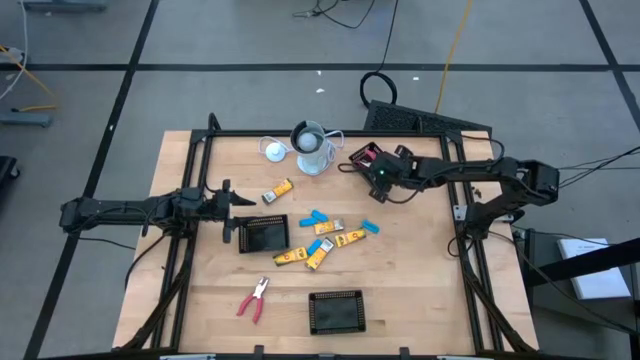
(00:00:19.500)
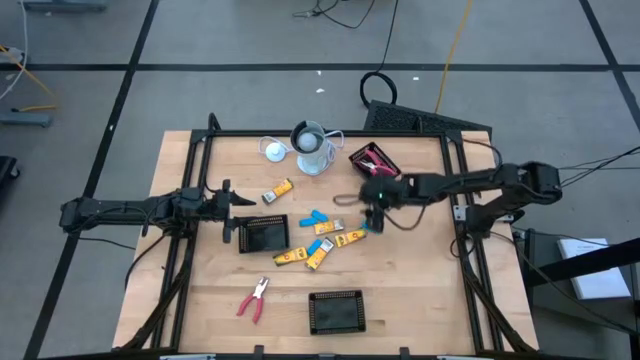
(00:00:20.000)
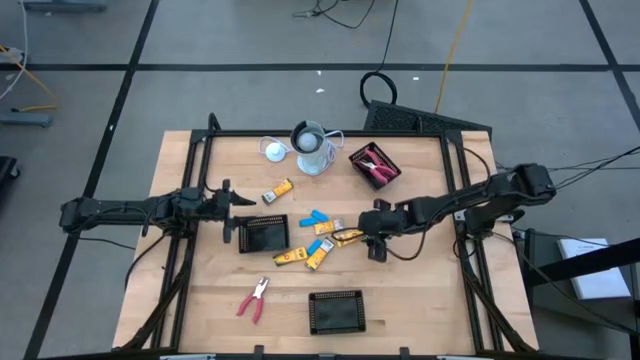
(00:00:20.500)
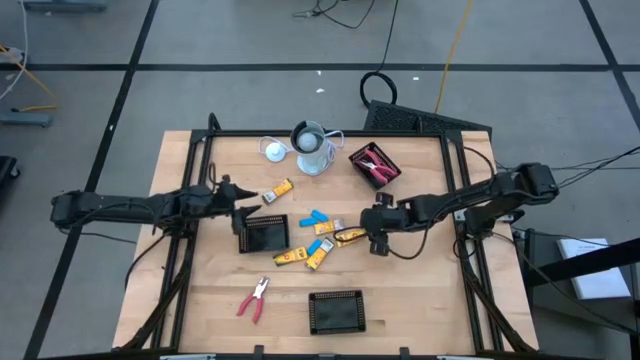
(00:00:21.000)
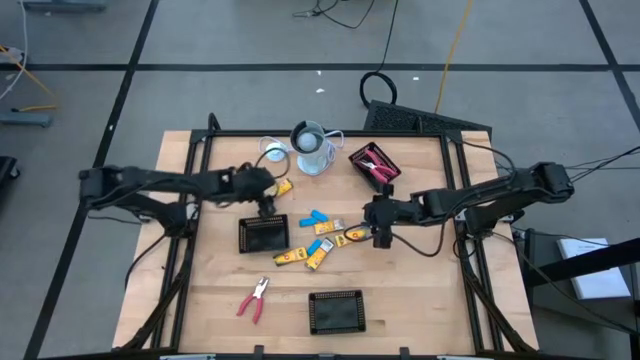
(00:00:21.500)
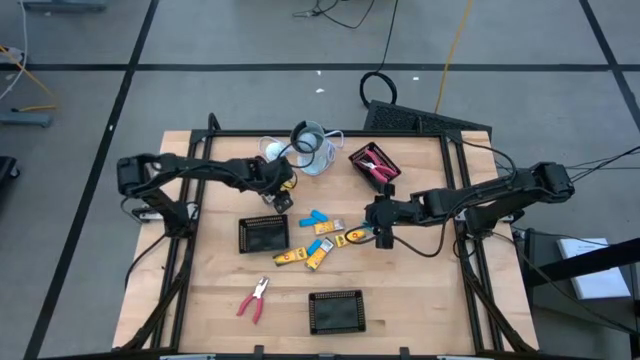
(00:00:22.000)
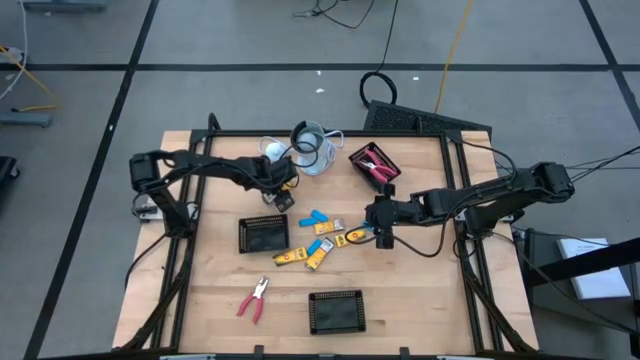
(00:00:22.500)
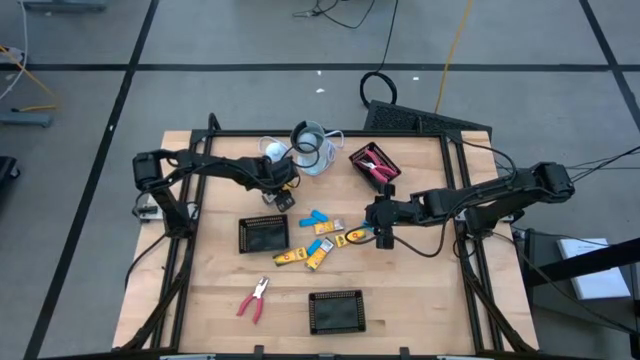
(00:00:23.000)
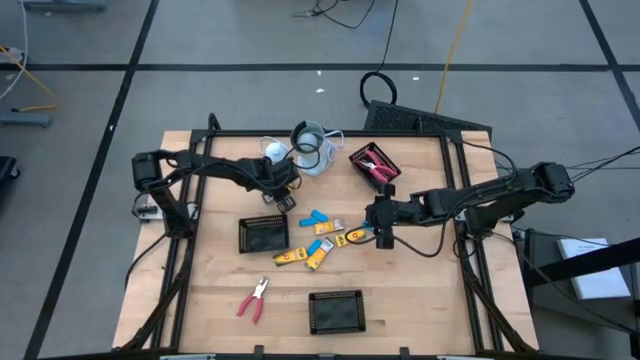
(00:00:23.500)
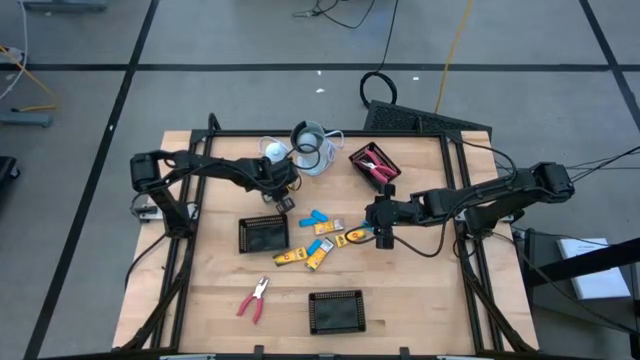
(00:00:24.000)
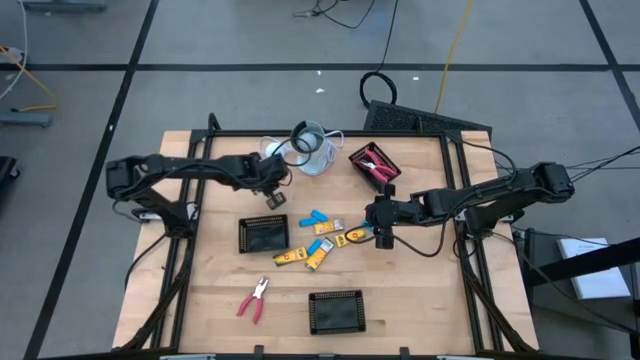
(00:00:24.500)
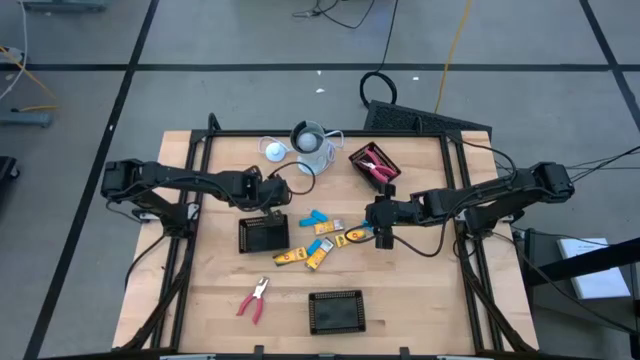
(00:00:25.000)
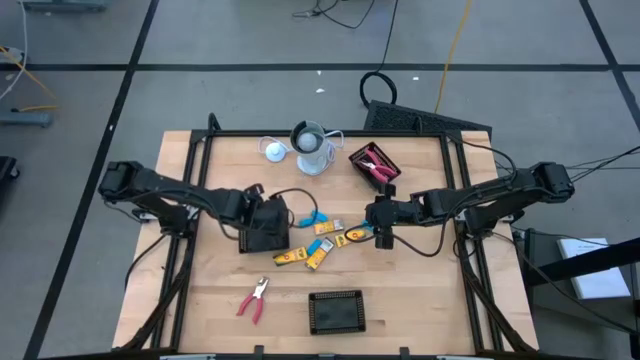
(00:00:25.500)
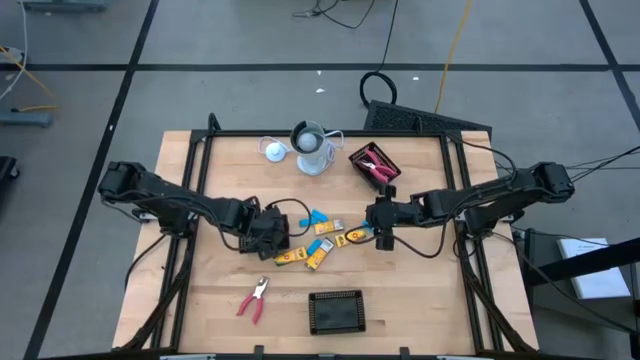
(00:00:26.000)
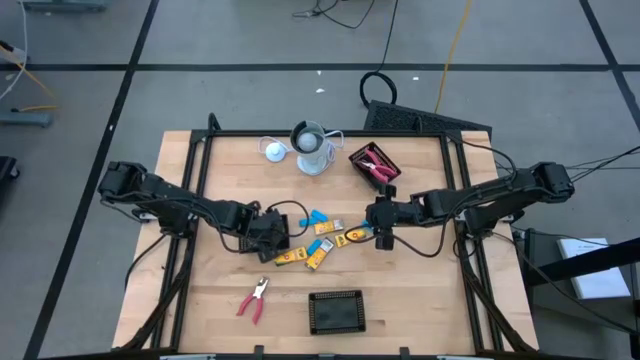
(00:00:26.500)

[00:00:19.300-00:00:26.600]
Task: Pick & Place School Supplies
Put the yellow crayon box into the middle black bin

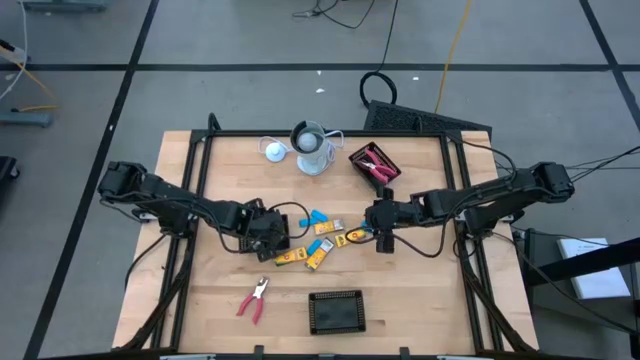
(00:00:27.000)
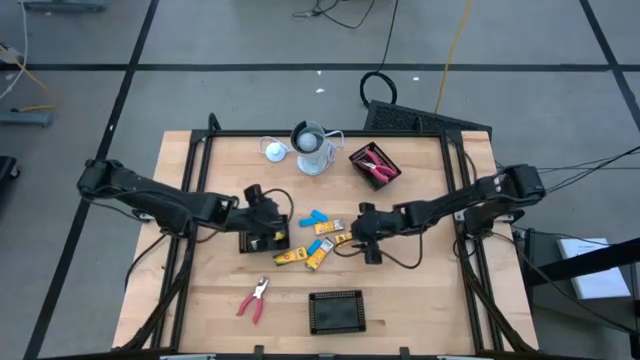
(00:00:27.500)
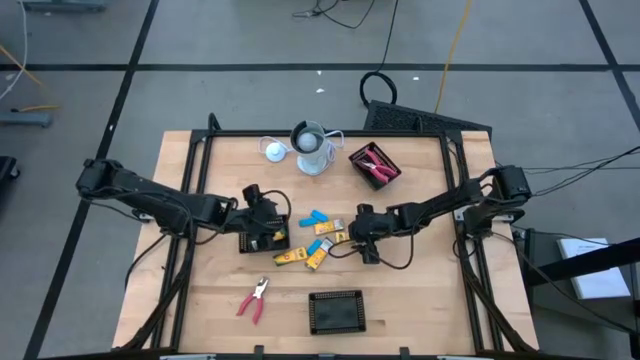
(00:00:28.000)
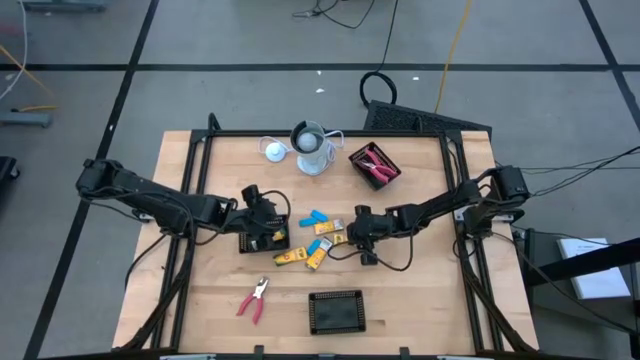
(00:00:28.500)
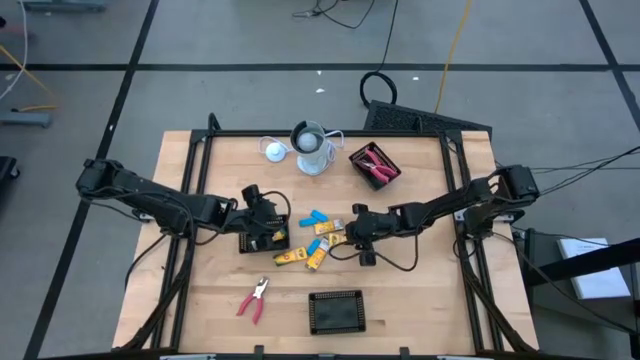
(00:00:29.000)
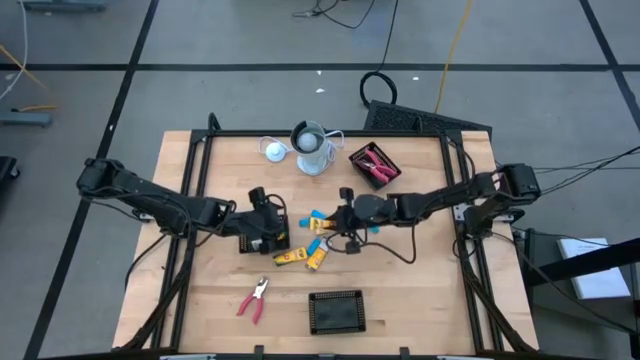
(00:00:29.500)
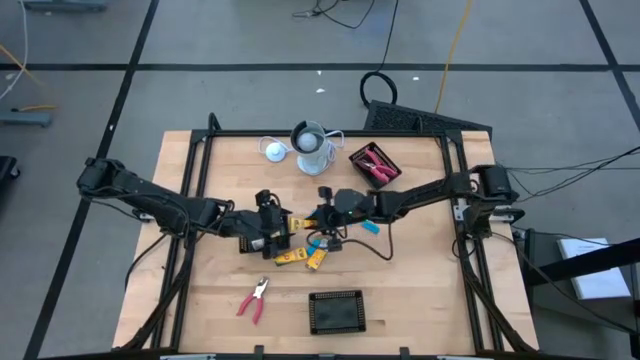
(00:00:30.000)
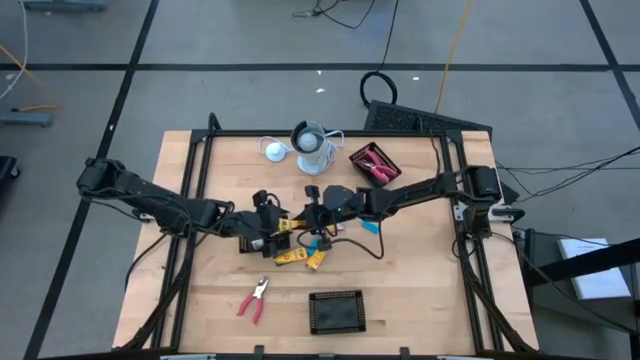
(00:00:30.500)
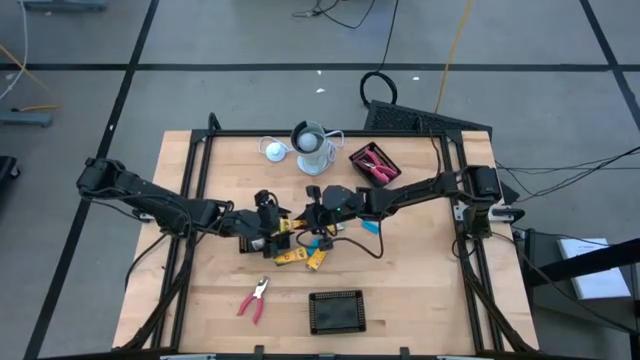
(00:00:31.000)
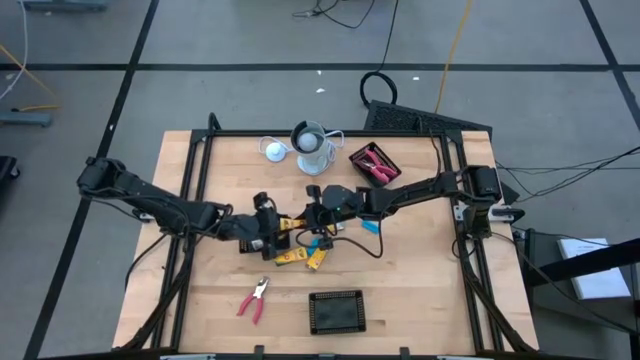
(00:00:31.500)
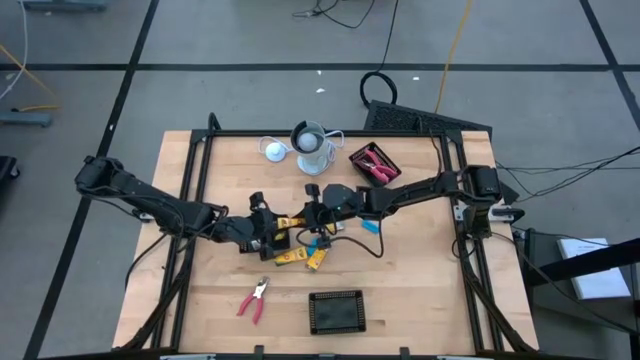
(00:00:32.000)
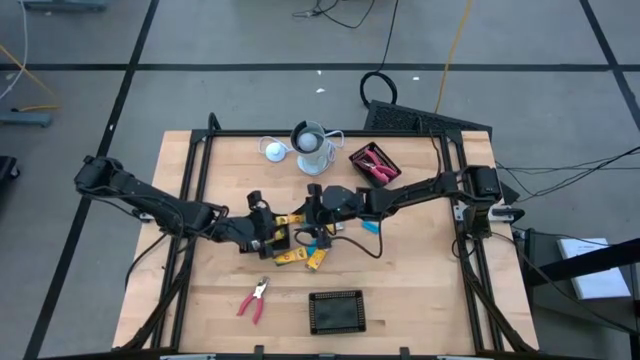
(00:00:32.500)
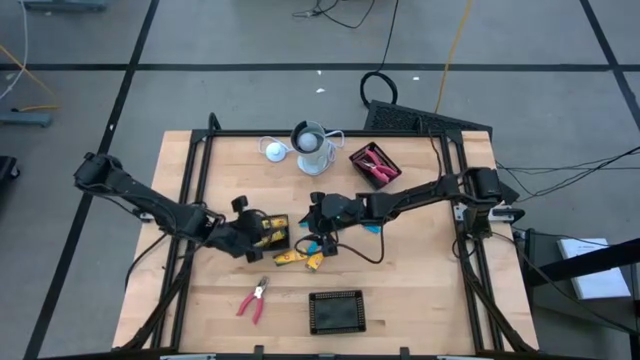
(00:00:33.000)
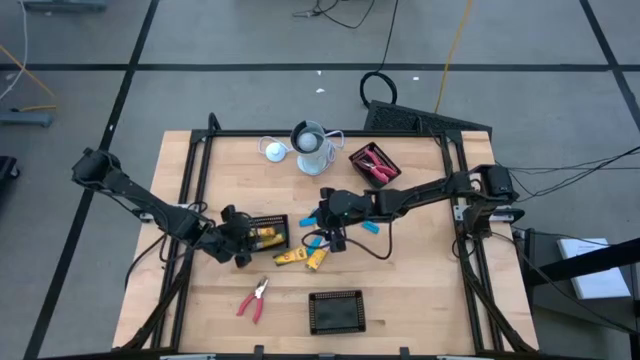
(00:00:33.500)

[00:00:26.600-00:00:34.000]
Put the yellow crayon box into the middle black bin

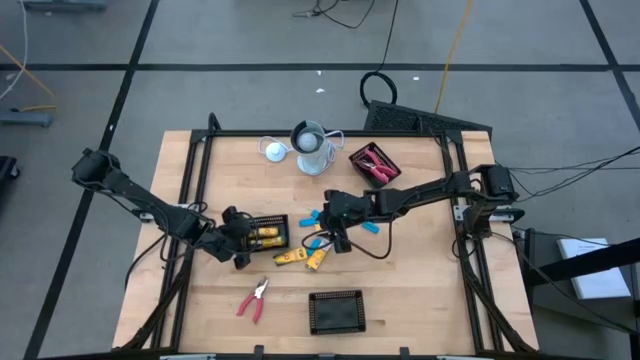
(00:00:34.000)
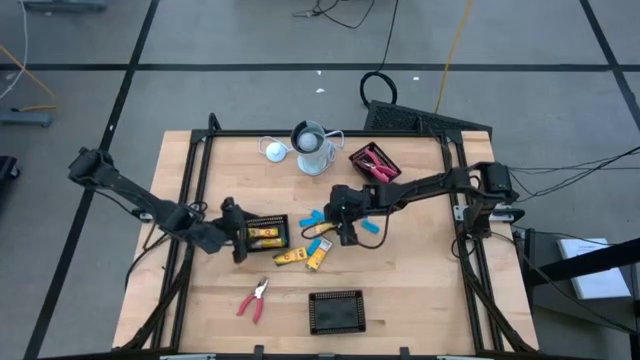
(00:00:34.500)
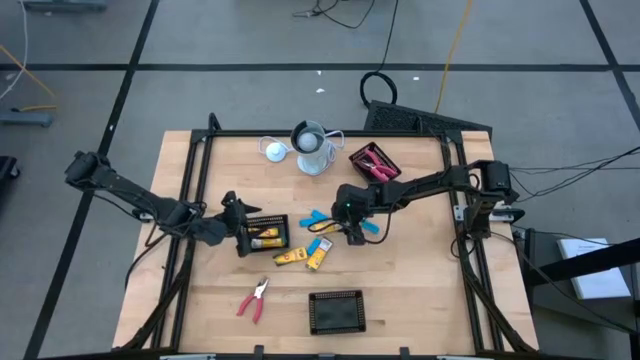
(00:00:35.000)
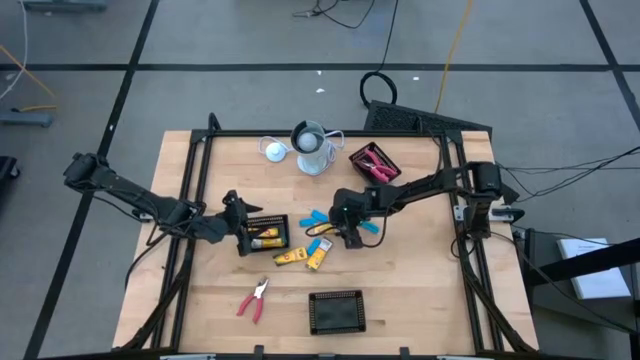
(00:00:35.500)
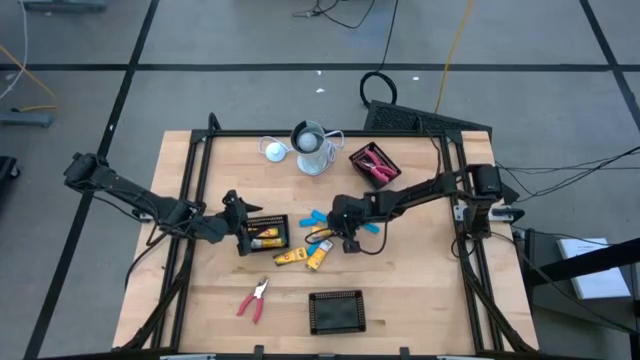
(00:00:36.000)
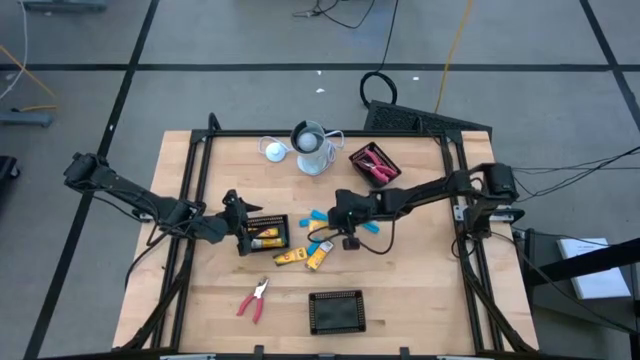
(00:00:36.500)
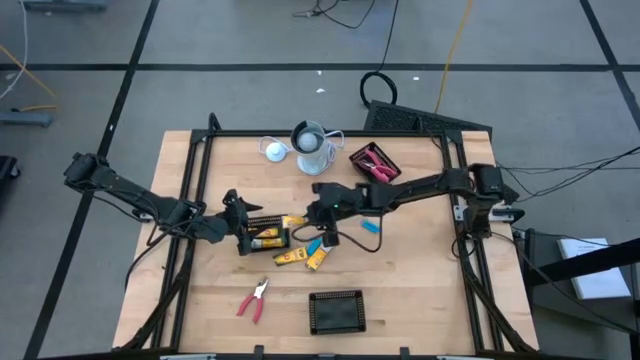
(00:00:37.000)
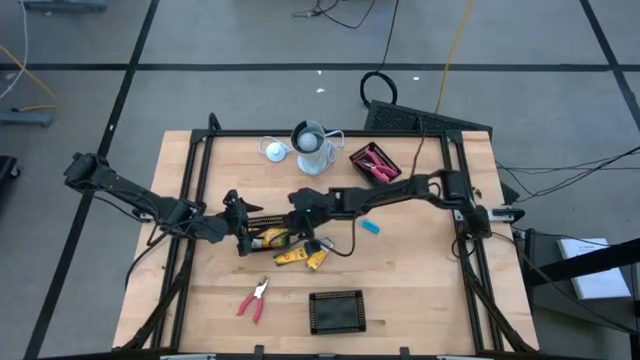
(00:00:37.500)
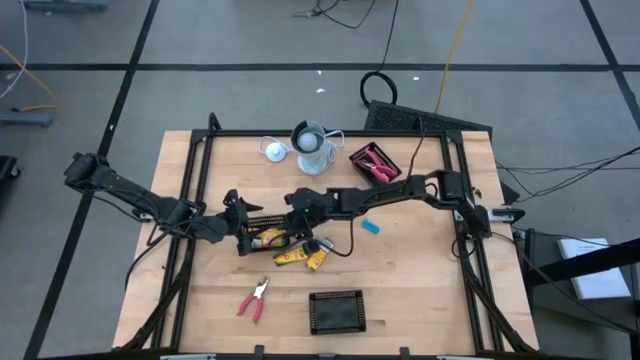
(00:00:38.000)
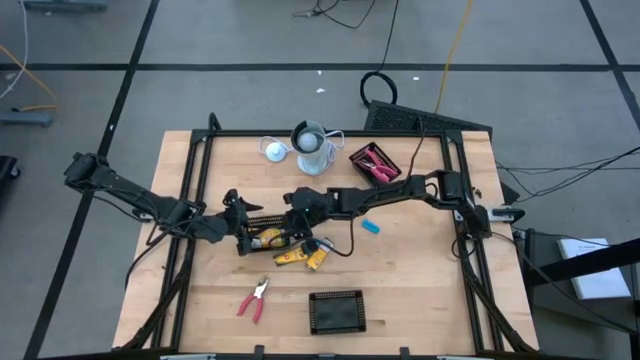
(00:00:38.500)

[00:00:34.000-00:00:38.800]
Put the yellow crayon box into the middle black bin

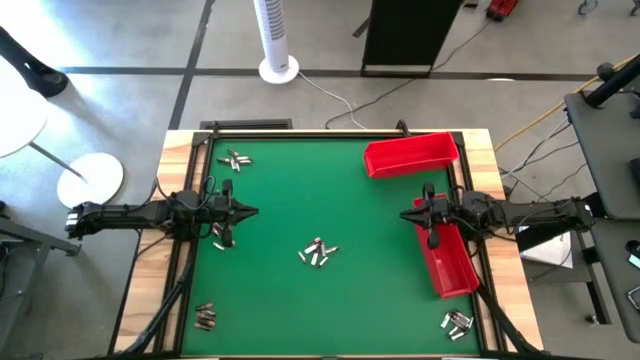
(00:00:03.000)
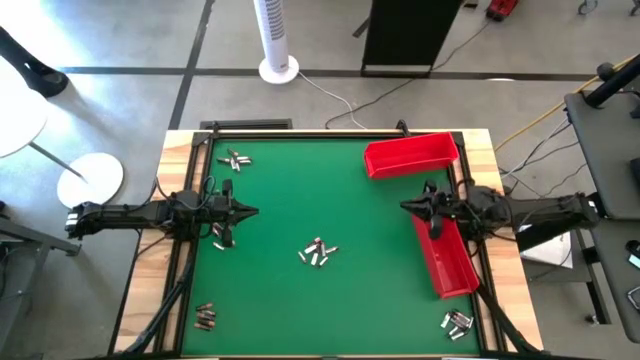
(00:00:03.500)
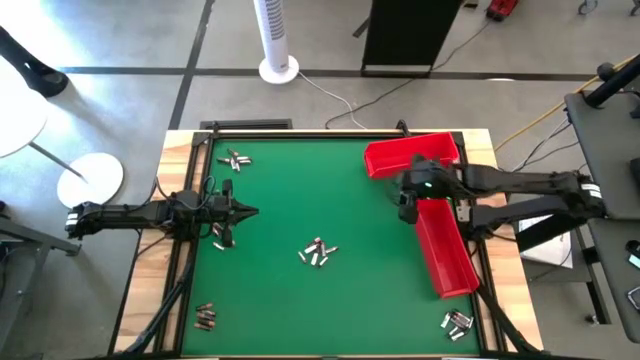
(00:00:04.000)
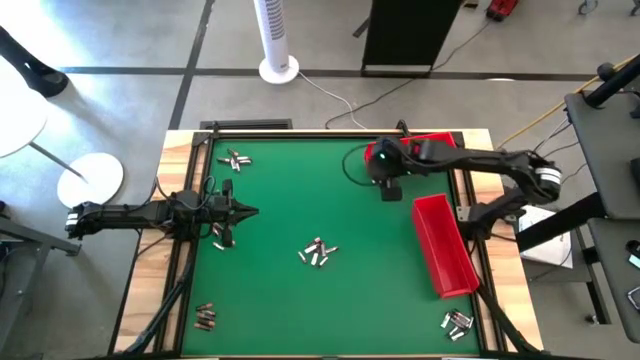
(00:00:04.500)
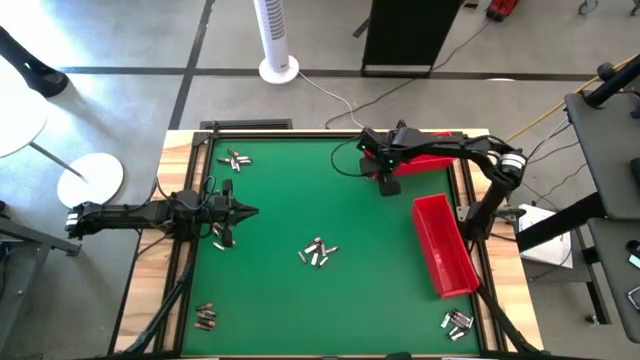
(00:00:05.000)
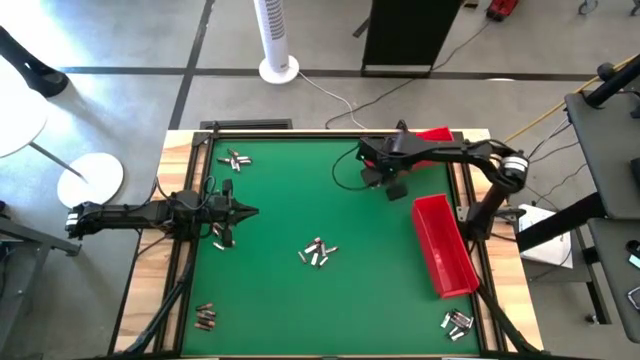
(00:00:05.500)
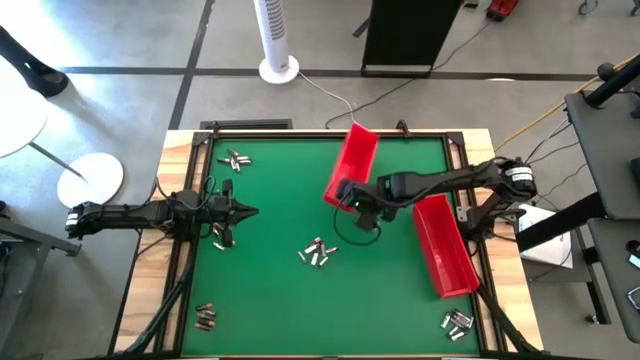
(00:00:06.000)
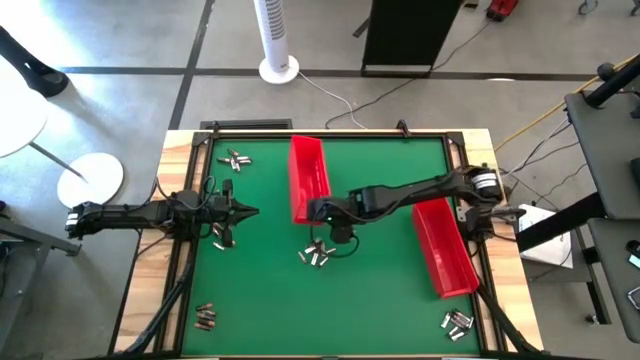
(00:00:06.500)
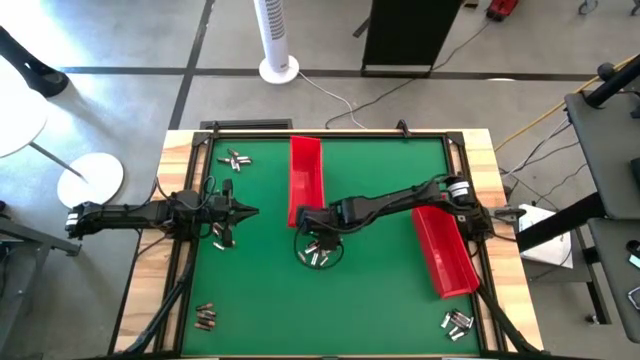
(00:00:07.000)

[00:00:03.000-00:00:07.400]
Task: Sort batteries
Move the top red bin to the top of the table
